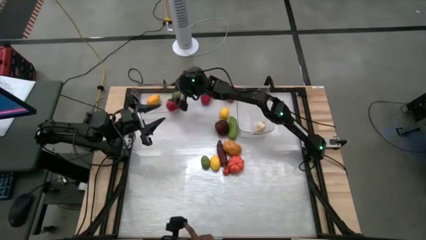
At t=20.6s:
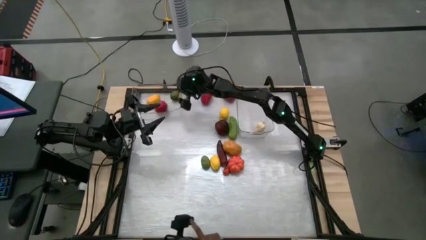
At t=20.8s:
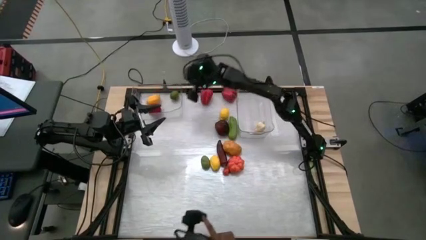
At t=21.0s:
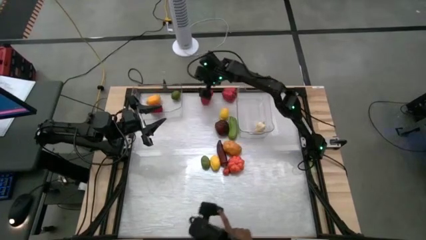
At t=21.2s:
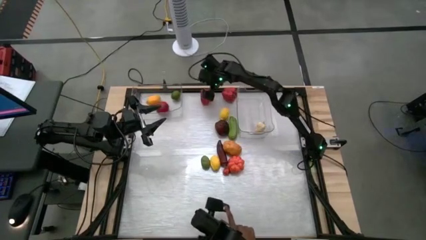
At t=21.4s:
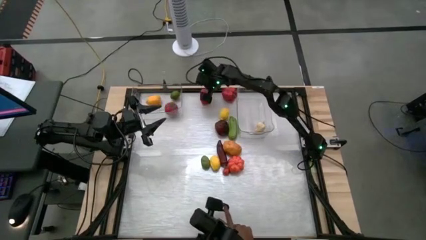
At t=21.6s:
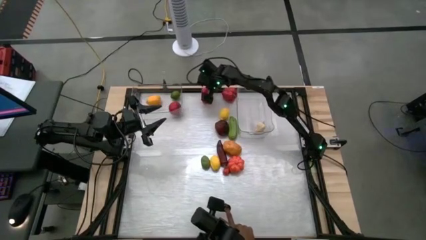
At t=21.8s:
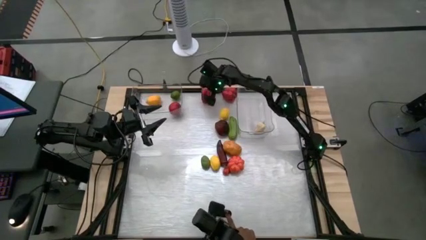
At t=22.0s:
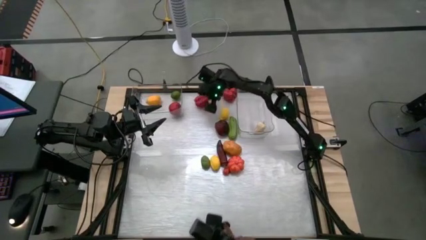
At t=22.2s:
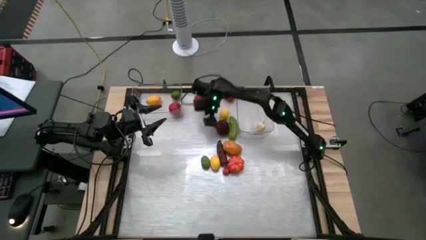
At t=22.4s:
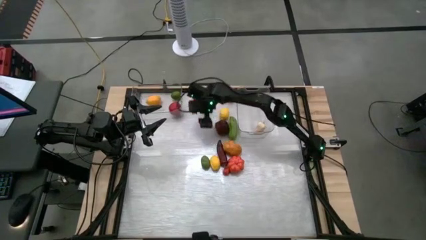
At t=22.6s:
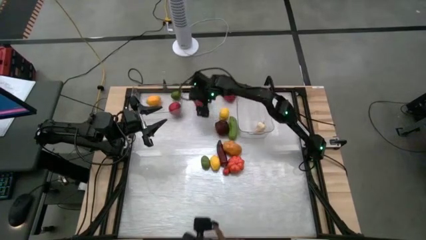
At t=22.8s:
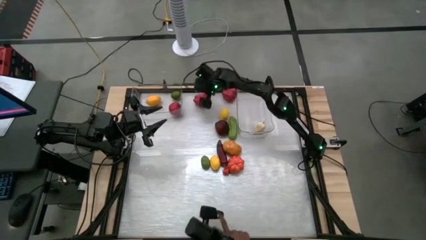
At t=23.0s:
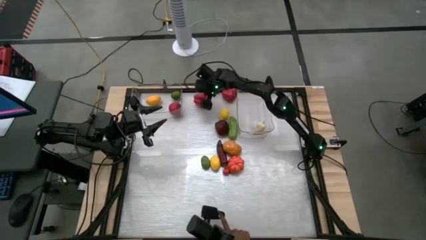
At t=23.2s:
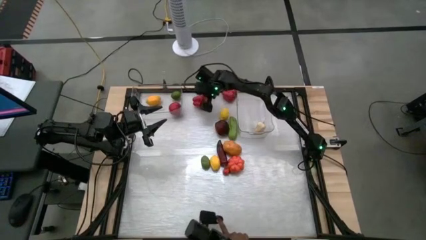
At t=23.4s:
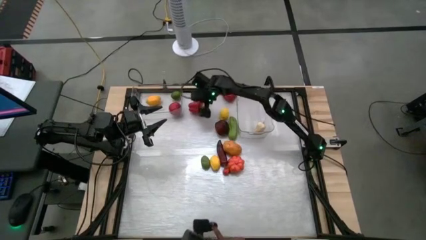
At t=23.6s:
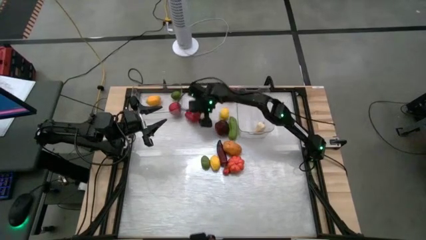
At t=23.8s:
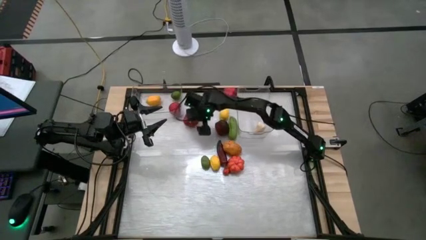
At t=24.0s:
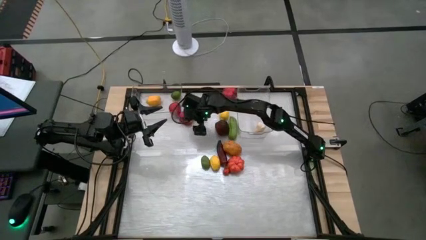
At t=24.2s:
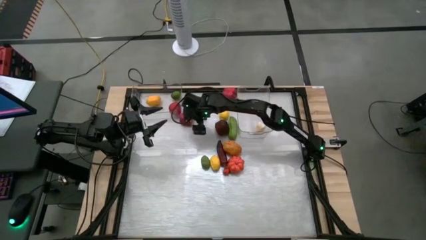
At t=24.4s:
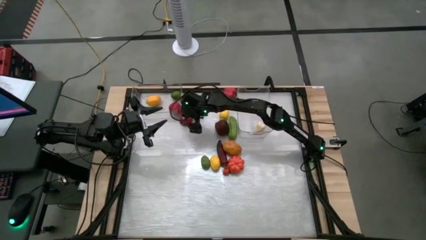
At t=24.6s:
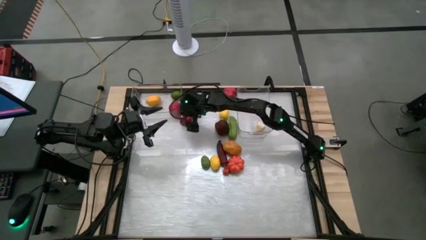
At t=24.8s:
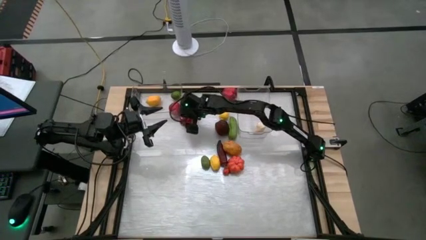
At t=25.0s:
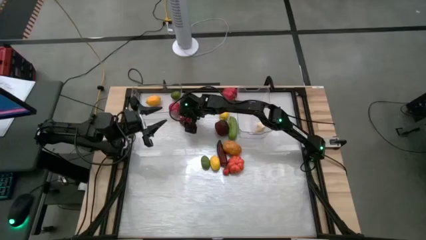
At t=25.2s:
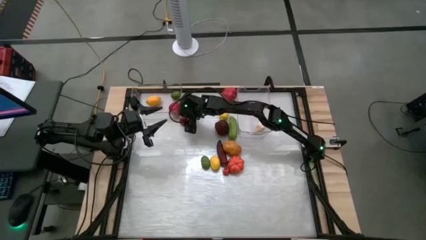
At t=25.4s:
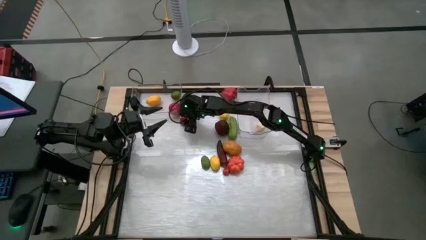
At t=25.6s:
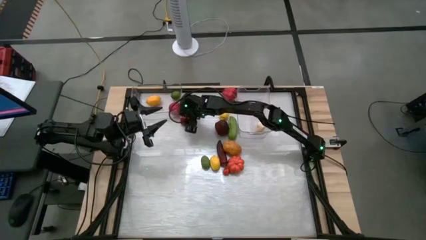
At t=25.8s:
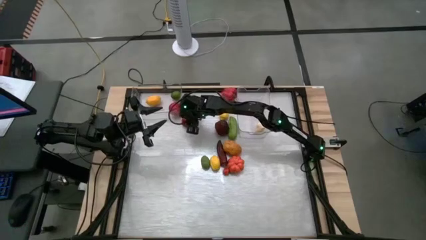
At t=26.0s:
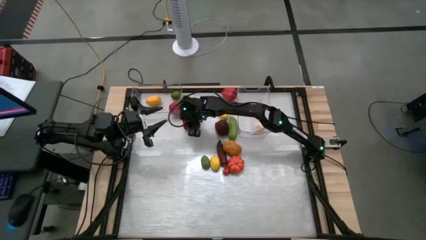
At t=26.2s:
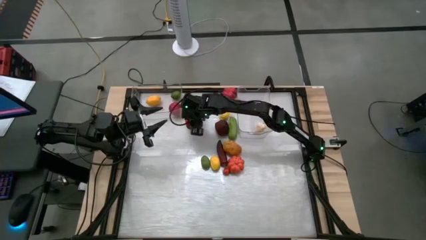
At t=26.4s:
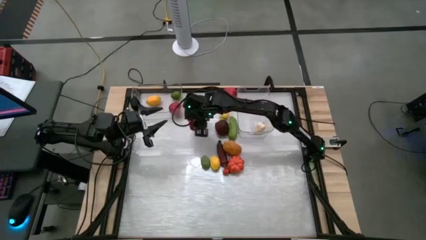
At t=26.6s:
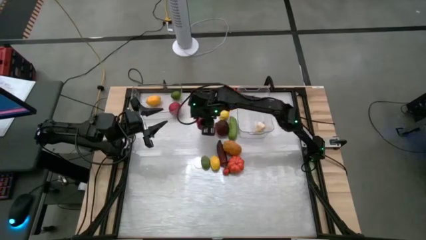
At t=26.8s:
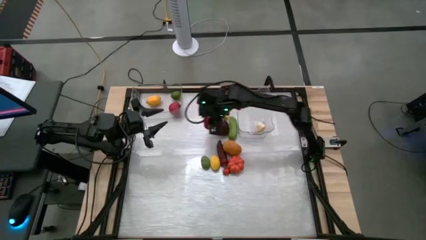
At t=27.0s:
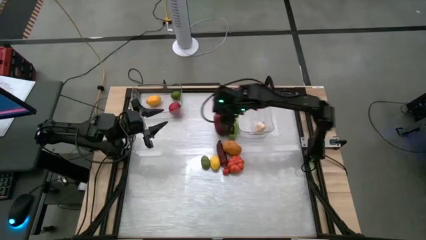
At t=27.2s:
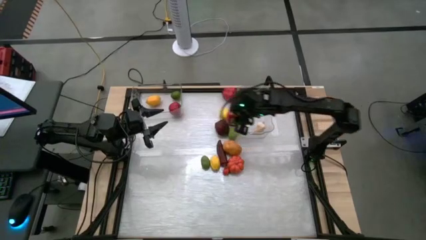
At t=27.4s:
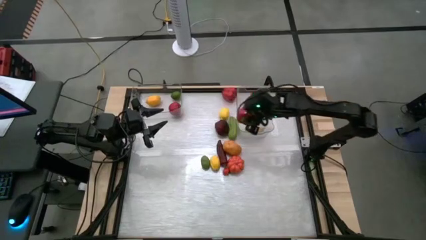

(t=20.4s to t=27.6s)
Task: Sort produce into baskets
Put the left red bell paper into the right transparent bin

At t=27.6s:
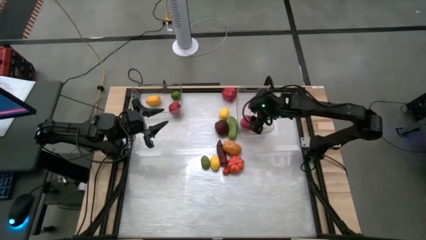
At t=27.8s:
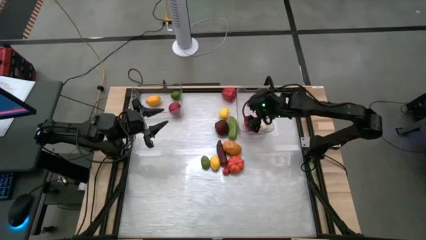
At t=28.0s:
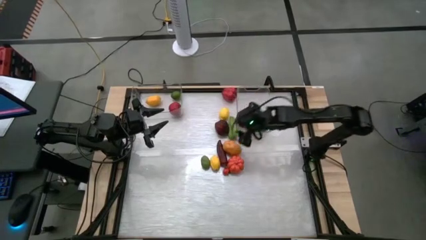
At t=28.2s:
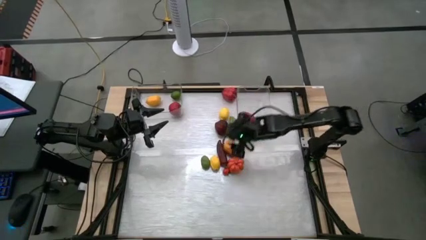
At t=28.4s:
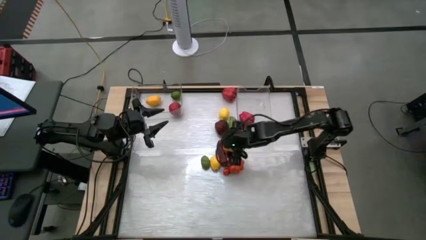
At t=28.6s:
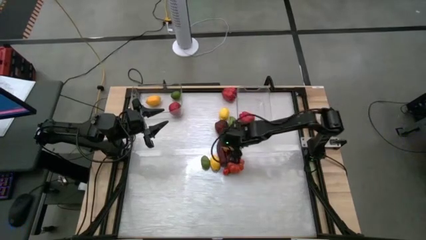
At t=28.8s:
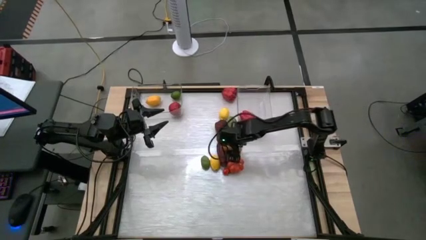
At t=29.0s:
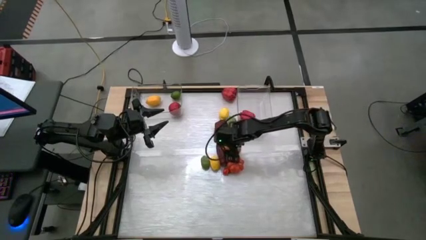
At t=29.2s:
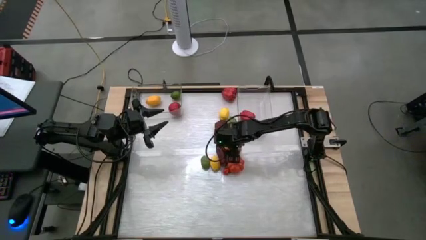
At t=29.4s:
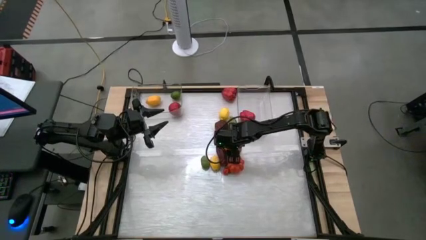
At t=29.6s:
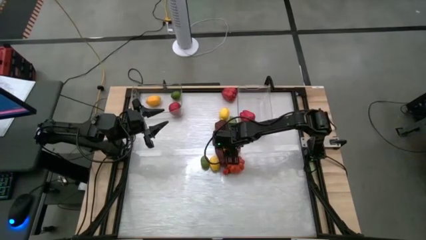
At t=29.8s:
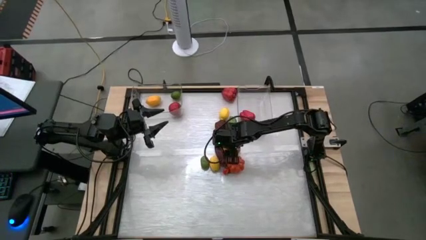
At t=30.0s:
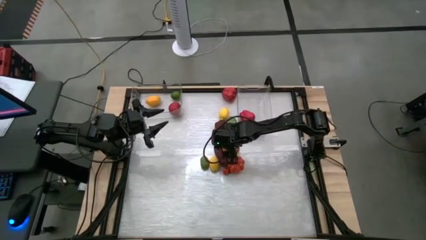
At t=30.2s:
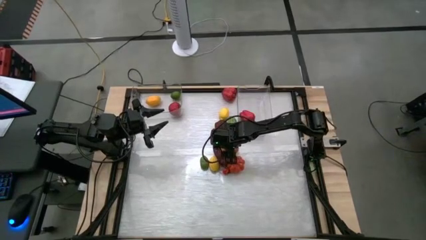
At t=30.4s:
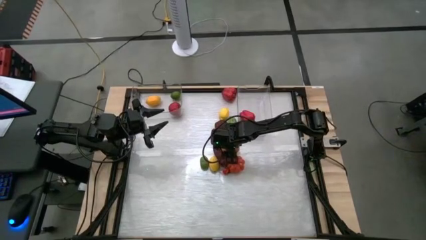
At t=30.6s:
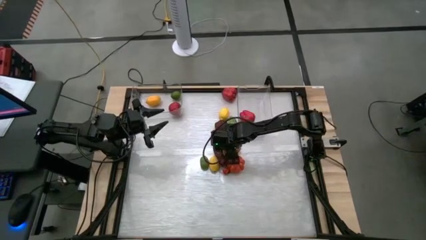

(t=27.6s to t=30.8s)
Put the brown potato into the right transparent bin

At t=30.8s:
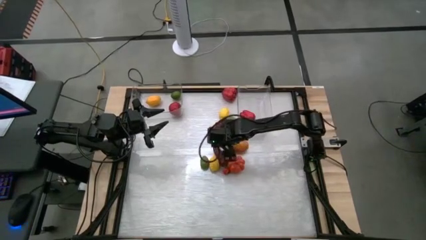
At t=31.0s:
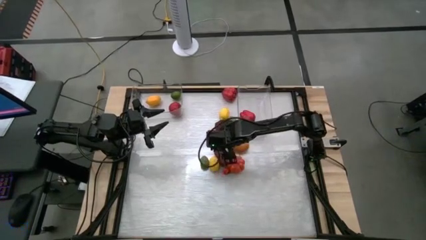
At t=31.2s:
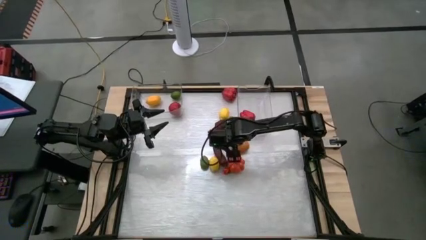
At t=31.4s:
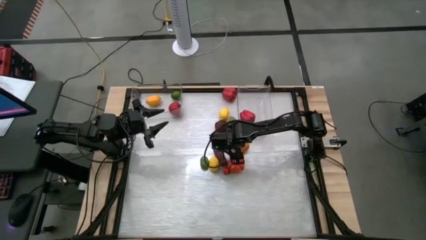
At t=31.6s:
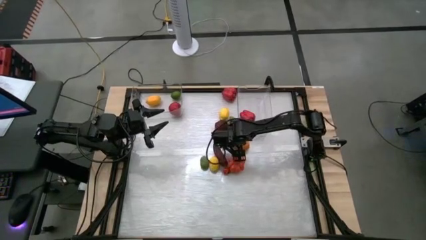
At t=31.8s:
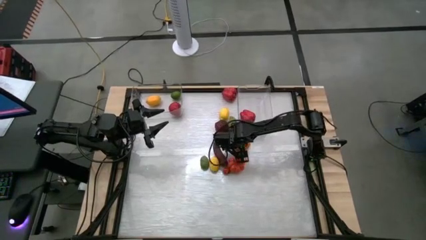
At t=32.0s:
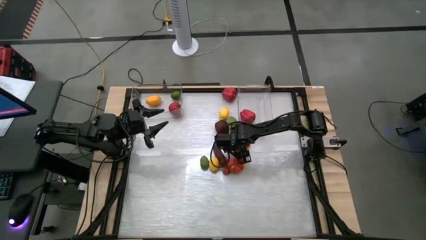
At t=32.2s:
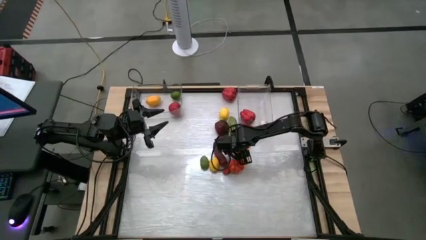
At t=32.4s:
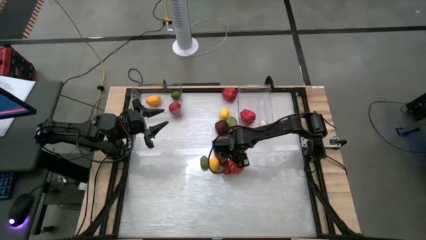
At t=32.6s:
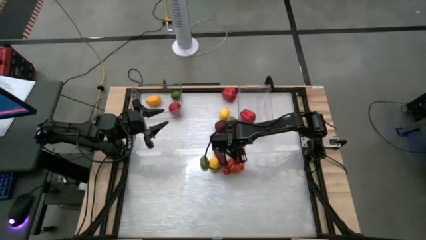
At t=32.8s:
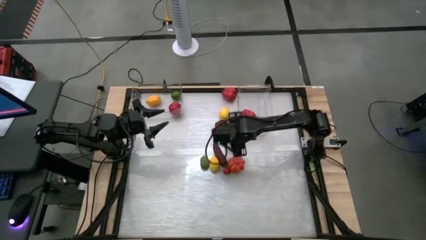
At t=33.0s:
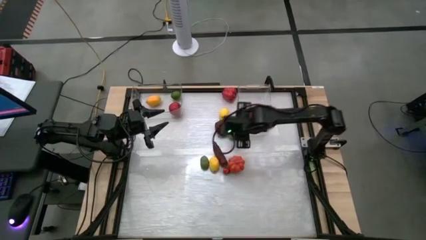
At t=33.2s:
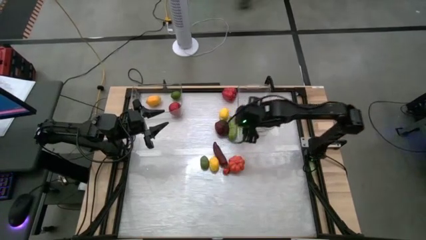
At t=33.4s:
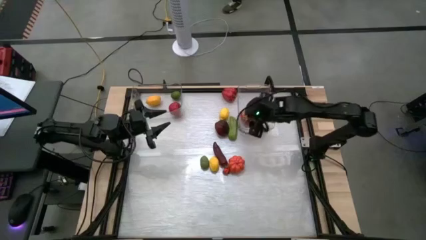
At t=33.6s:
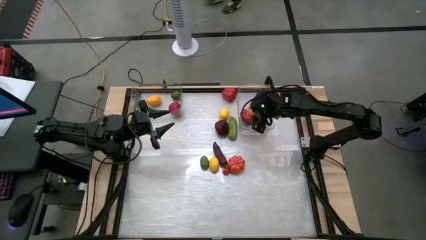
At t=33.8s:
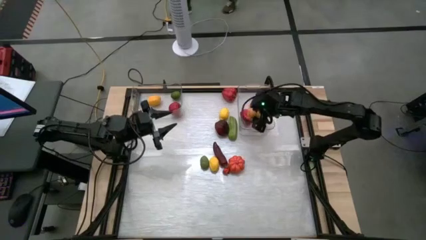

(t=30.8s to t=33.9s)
Put the brown potato into the right transparent bin

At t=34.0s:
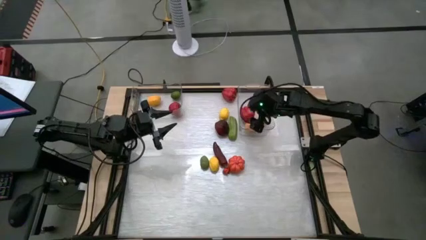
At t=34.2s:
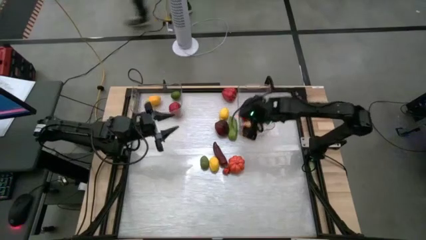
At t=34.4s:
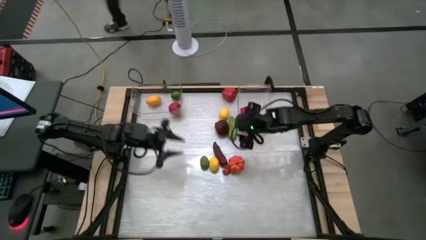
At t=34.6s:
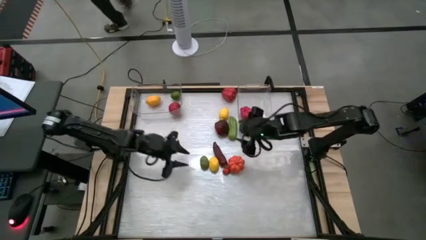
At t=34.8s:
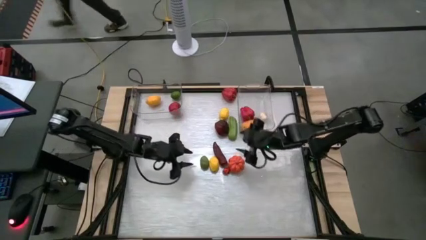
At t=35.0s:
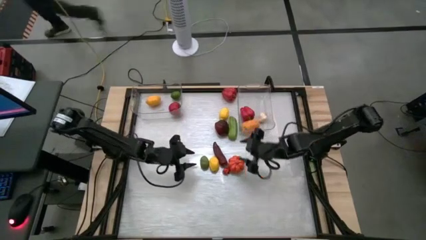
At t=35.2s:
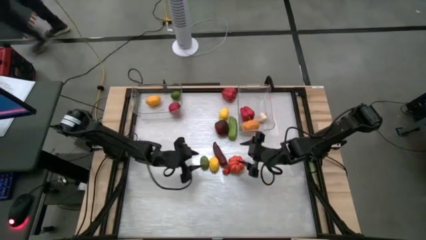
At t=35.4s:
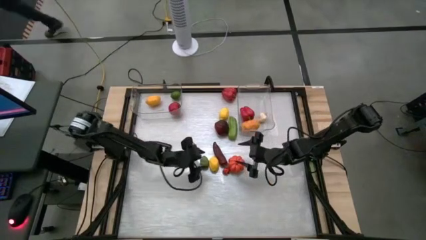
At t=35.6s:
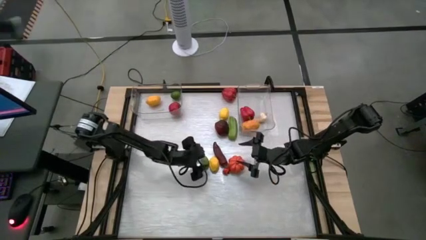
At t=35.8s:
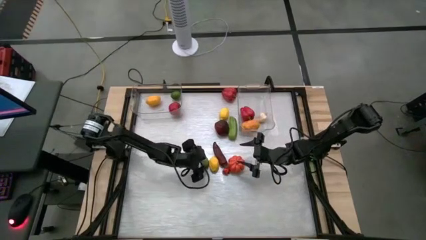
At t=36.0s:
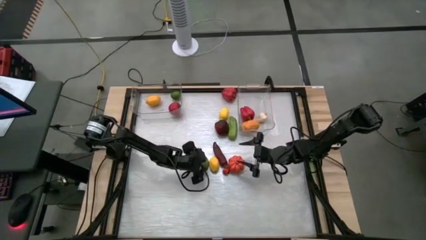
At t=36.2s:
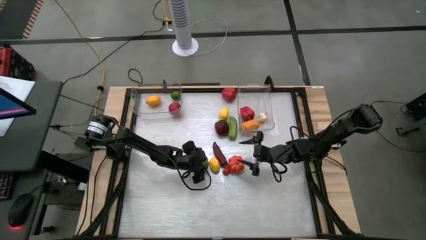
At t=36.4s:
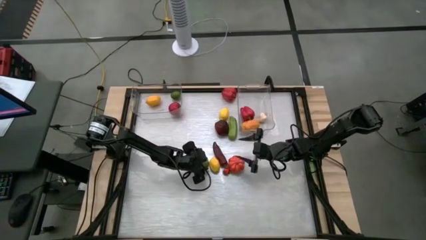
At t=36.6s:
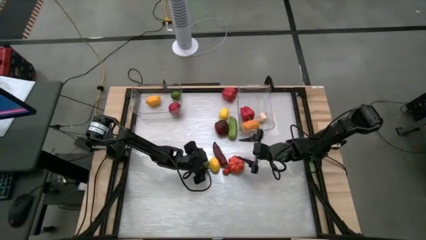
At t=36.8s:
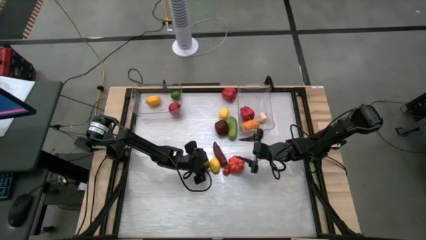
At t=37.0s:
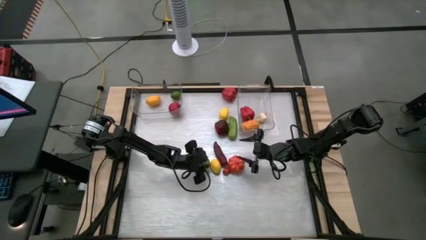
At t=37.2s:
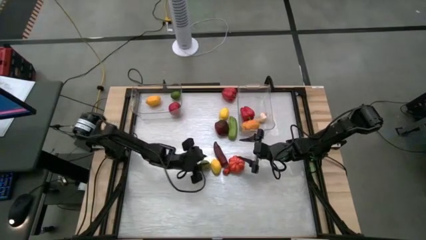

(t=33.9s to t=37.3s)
Put the green lime into the left transparent bin
